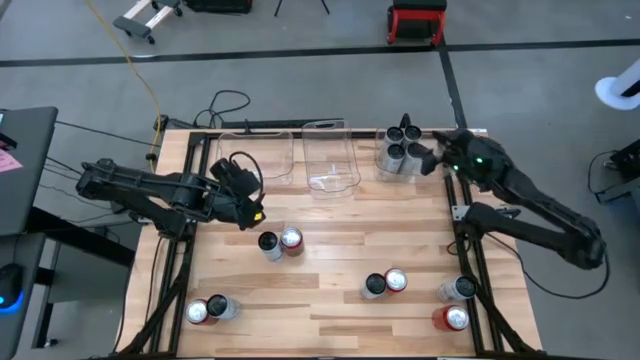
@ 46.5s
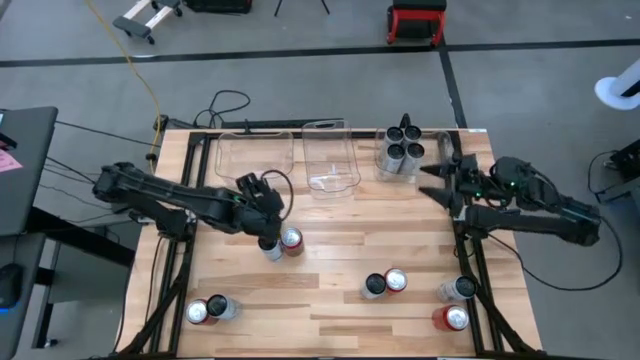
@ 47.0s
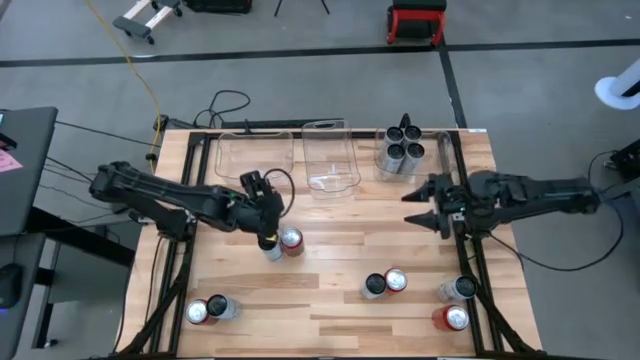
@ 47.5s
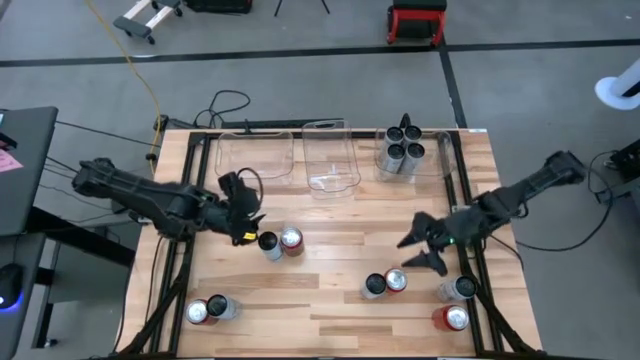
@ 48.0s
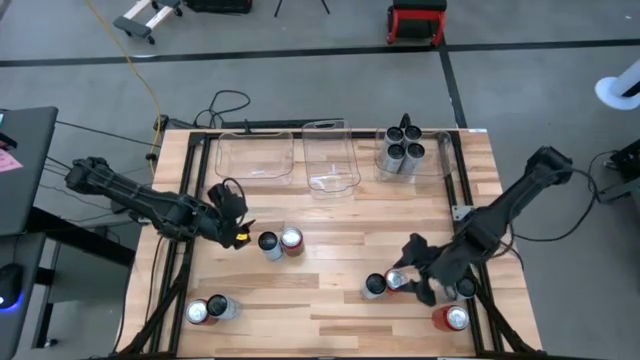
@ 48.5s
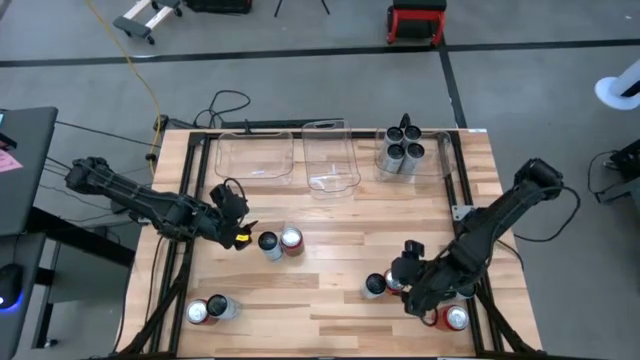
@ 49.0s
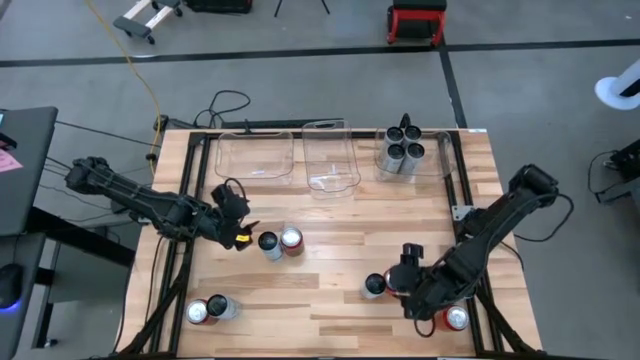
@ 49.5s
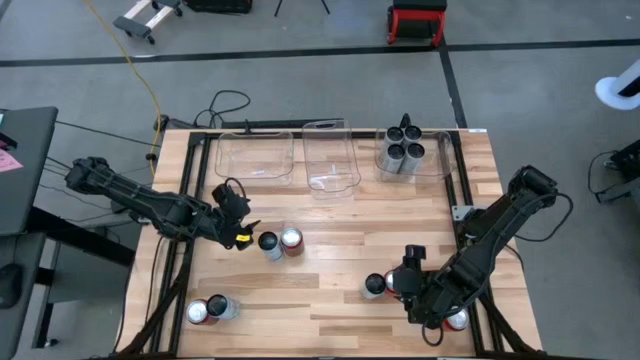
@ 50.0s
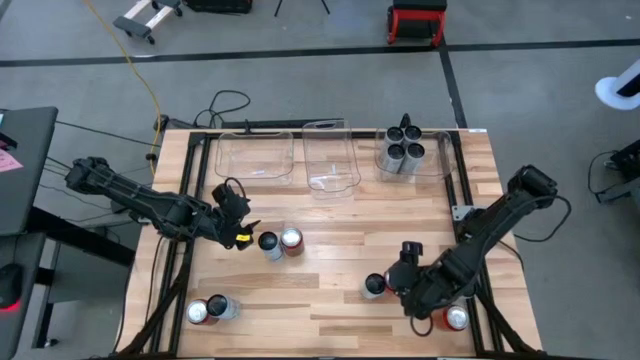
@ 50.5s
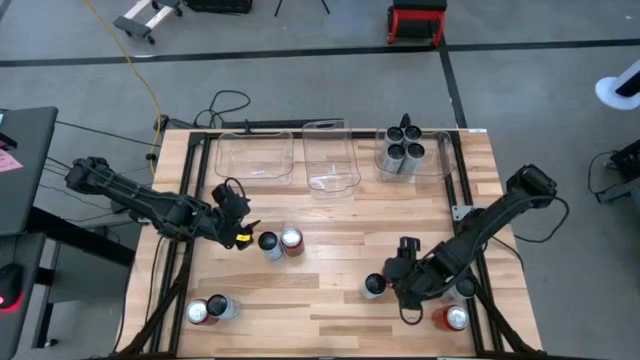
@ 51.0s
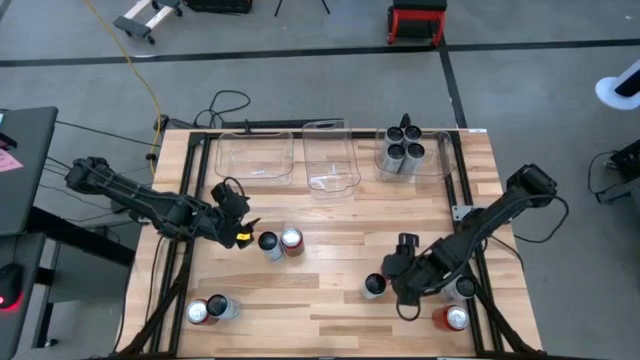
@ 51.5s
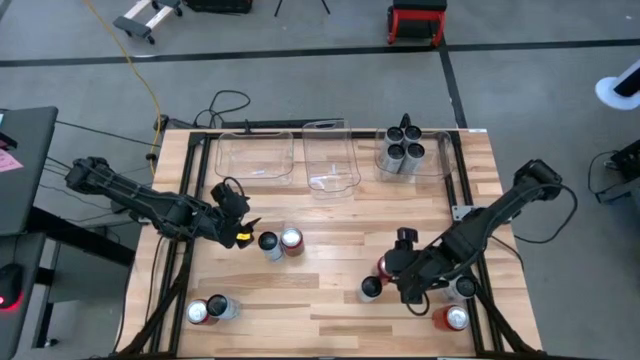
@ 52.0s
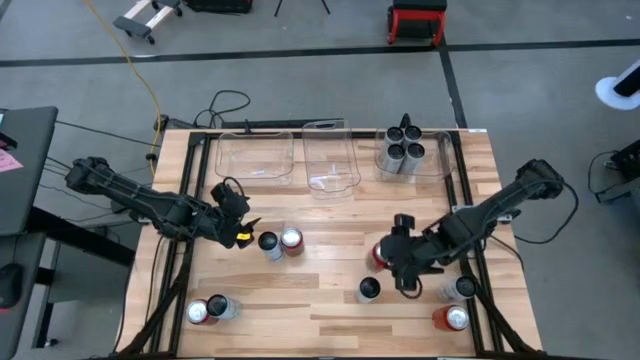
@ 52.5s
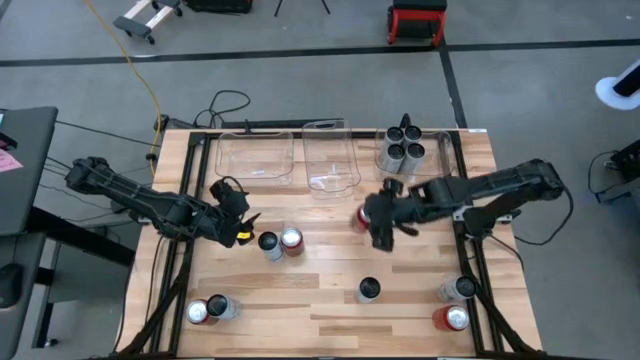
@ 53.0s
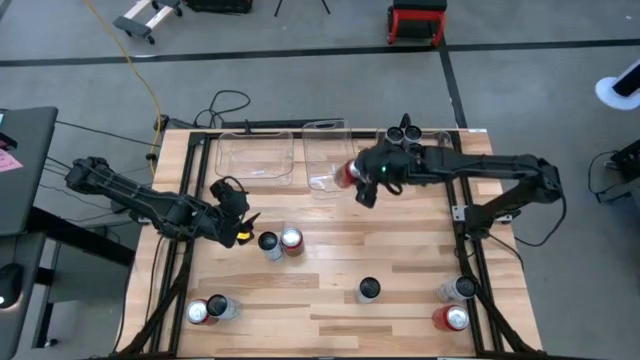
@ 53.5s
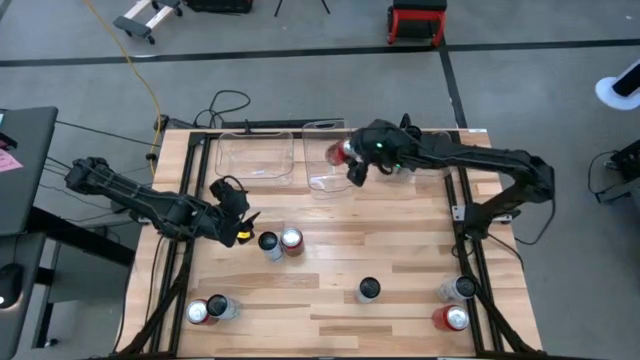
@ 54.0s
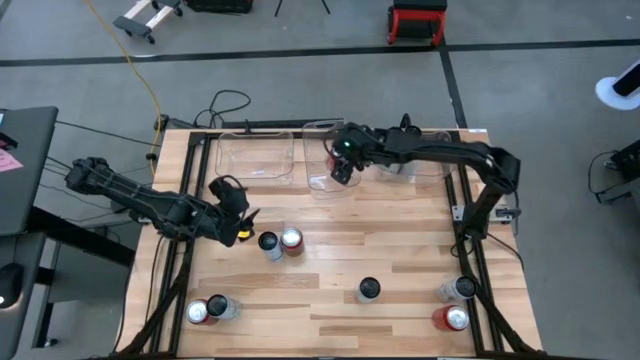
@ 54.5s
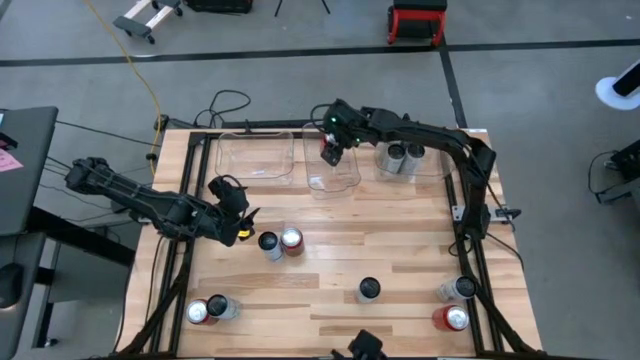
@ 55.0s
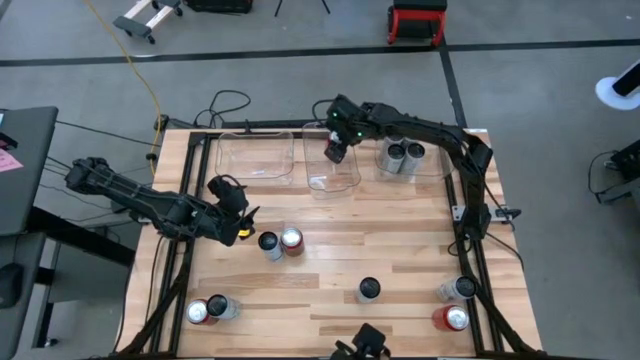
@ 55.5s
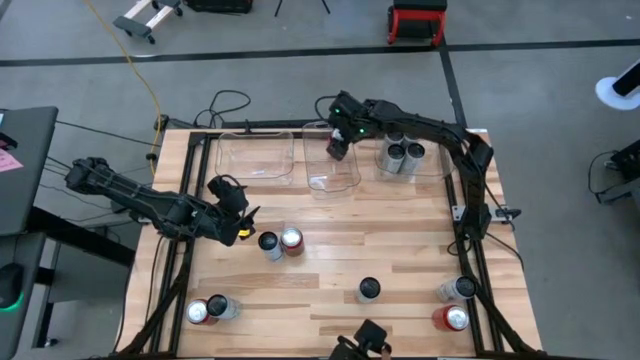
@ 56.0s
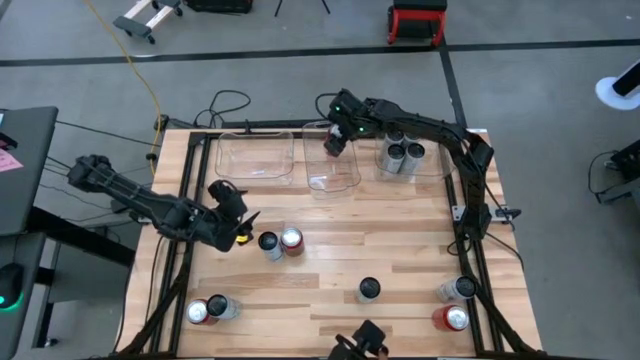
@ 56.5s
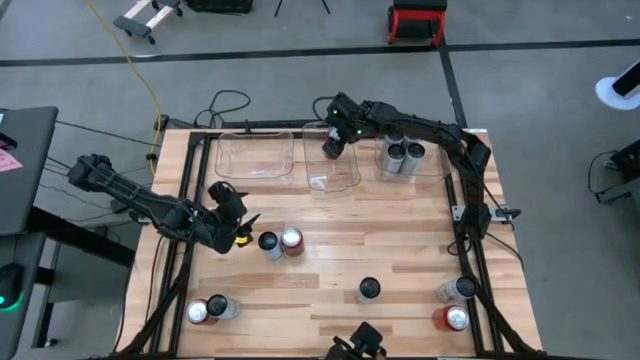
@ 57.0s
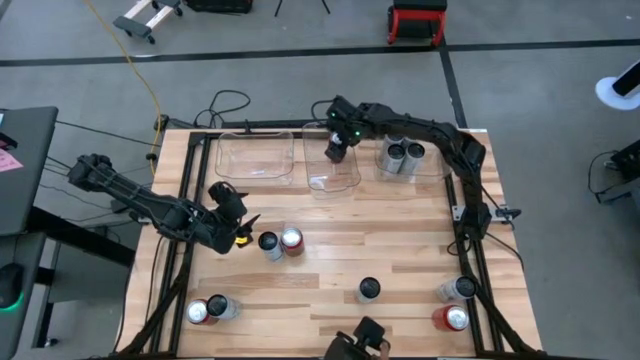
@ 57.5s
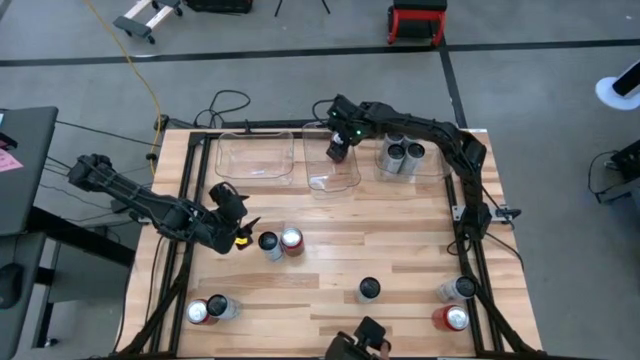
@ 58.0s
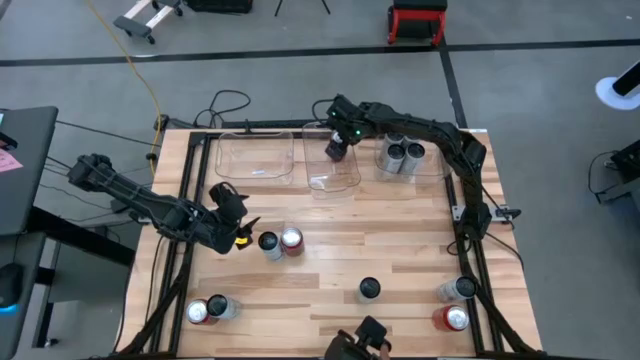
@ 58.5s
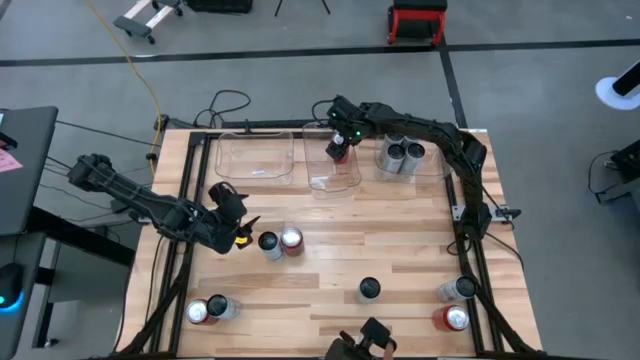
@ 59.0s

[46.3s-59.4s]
Task: Sort soda cans
Put the red-black soda can into the middle transparent bin

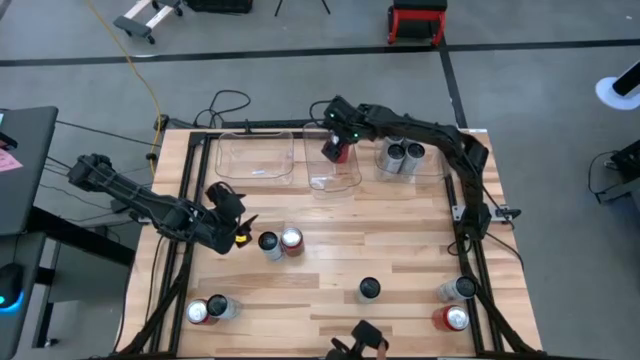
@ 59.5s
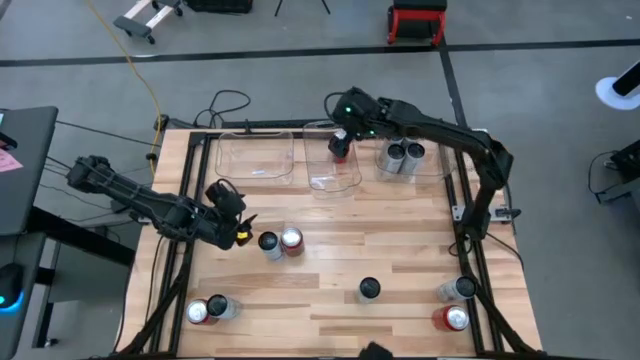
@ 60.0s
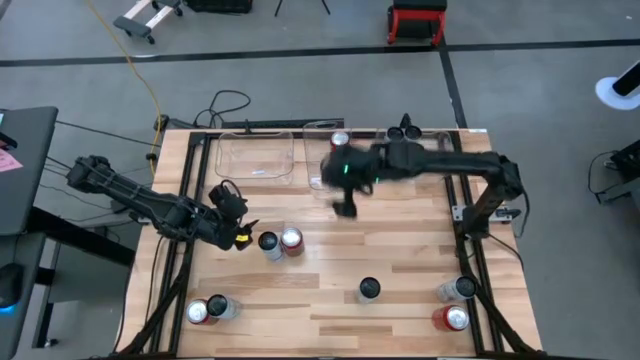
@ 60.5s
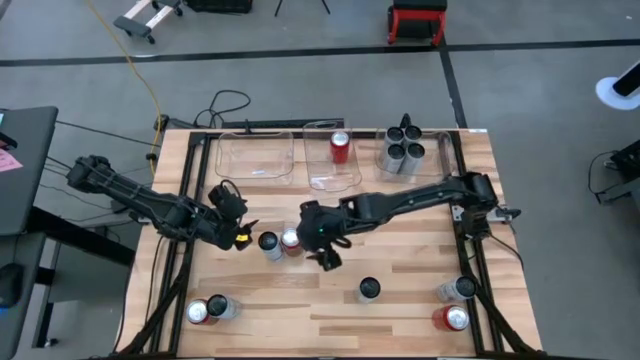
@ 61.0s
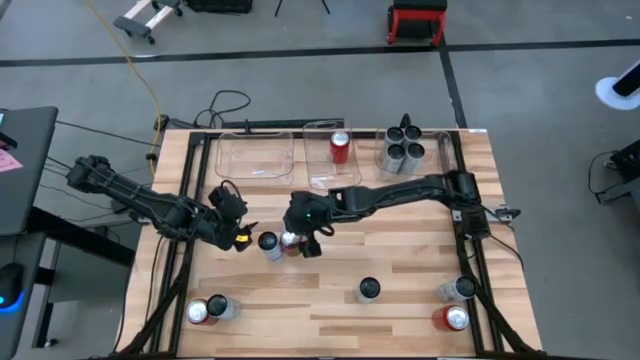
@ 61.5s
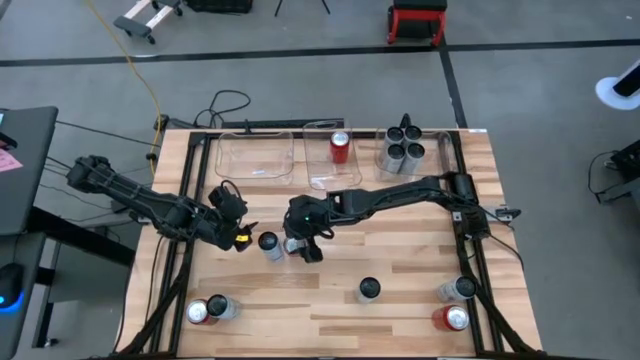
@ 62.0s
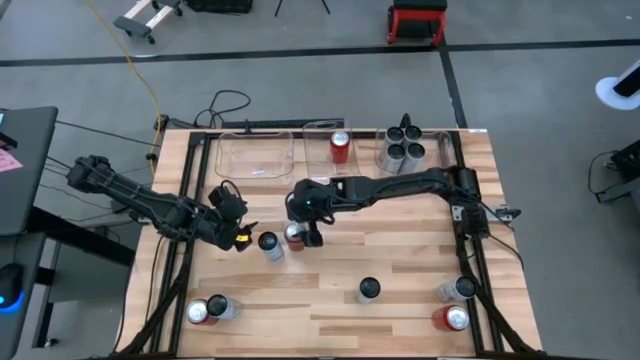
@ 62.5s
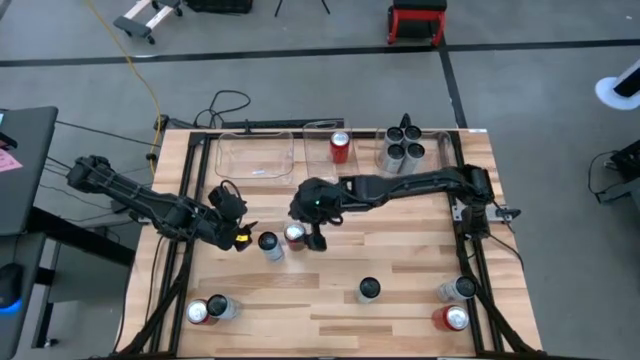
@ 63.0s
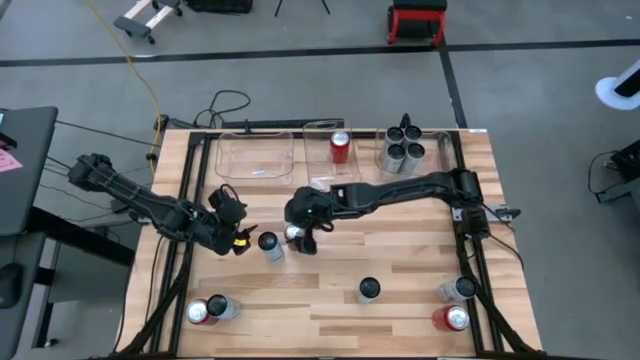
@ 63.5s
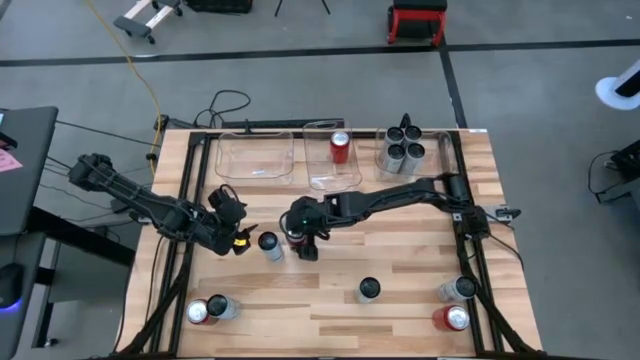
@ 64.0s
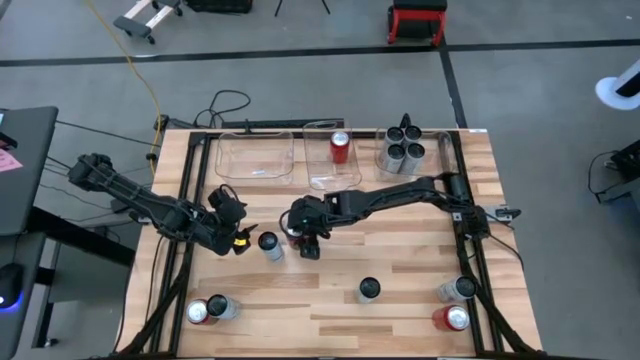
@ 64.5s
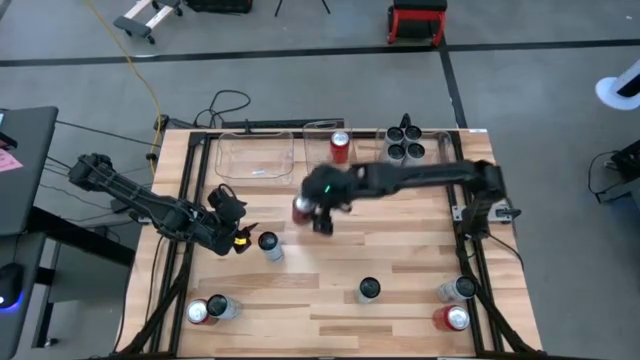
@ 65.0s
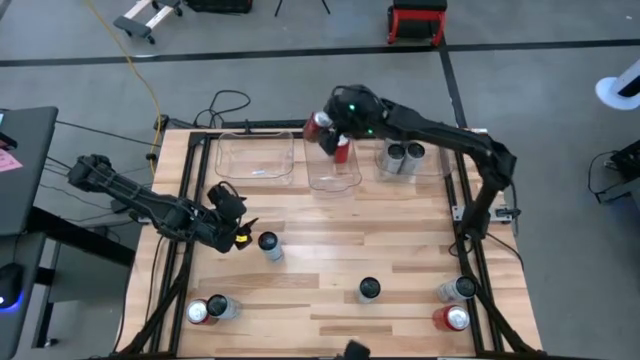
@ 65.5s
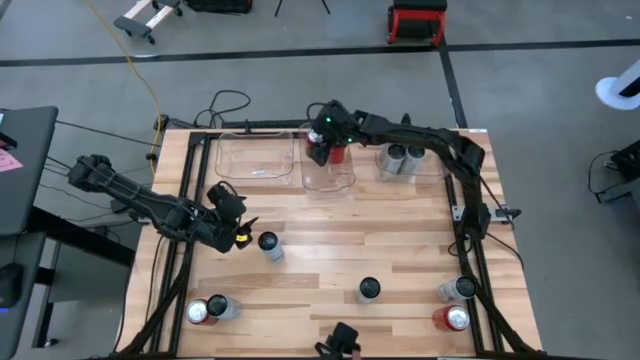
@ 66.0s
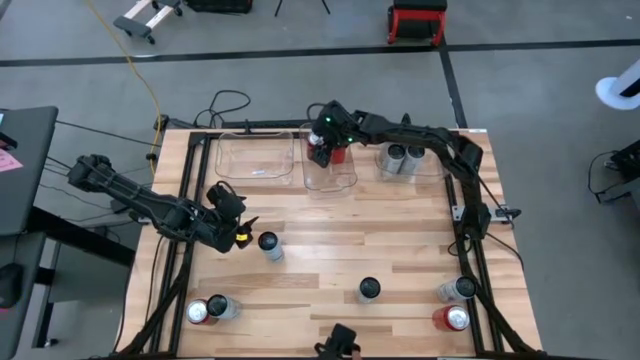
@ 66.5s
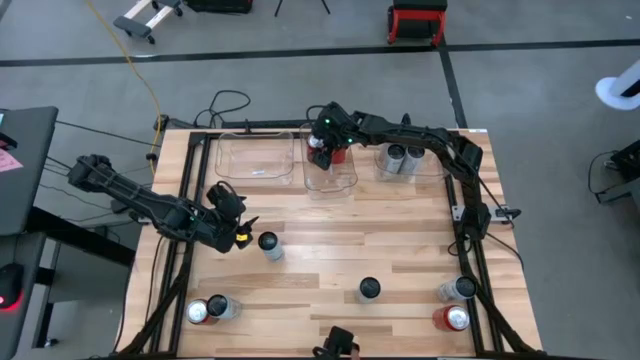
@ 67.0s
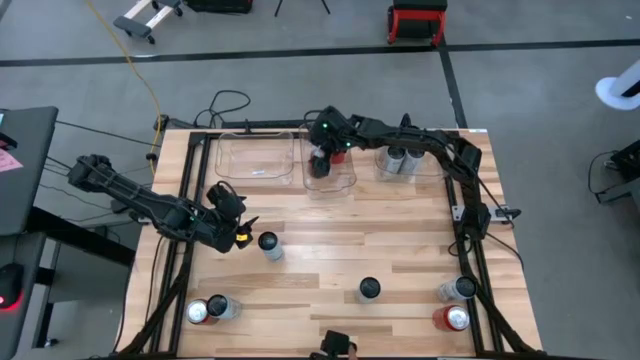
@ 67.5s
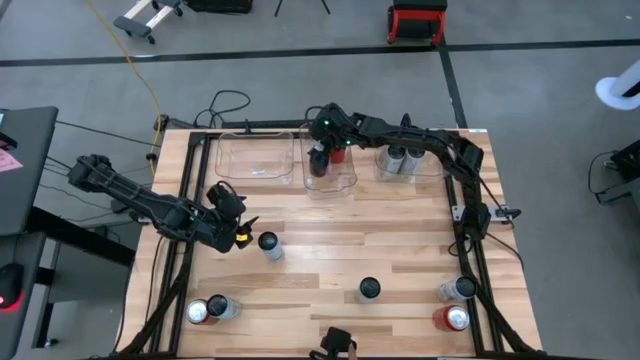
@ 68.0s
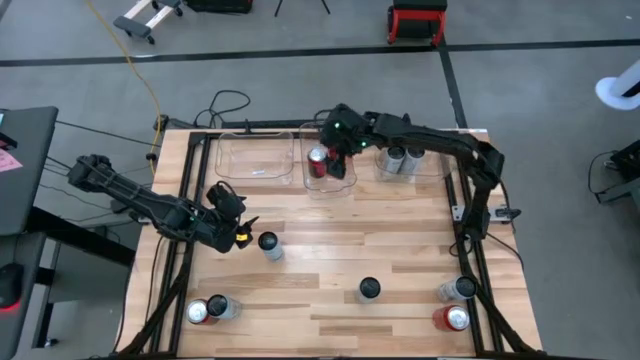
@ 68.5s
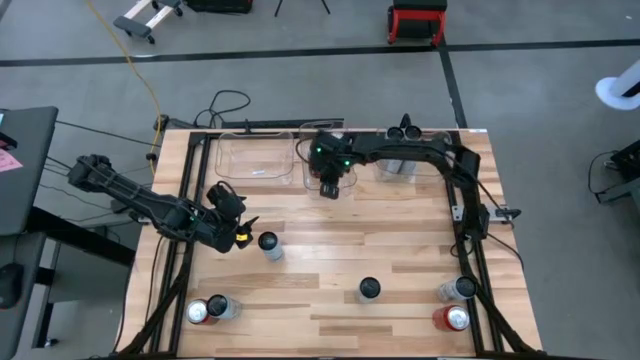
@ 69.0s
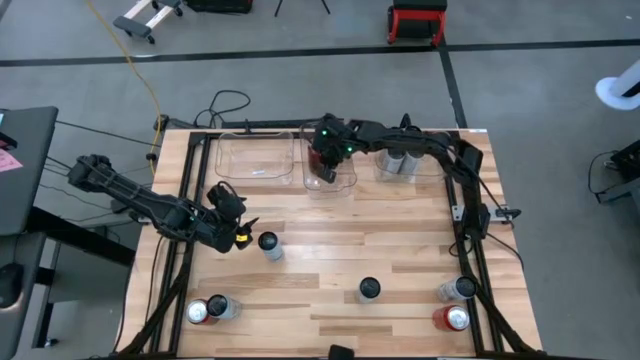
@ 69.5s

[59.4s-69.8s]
Put the red-black soda can into the middle transparent bin
